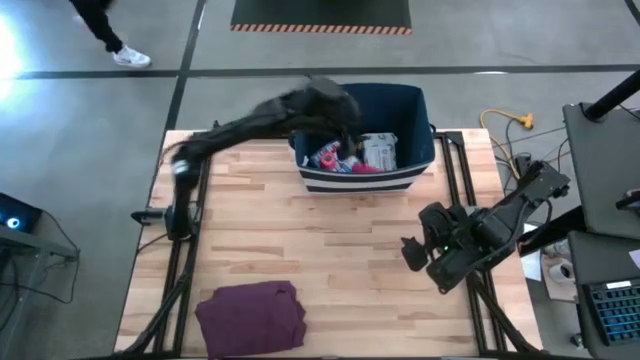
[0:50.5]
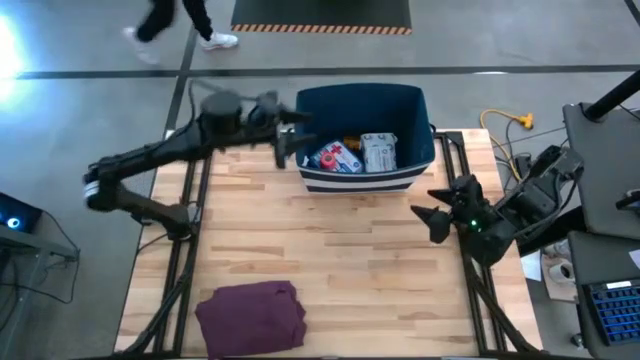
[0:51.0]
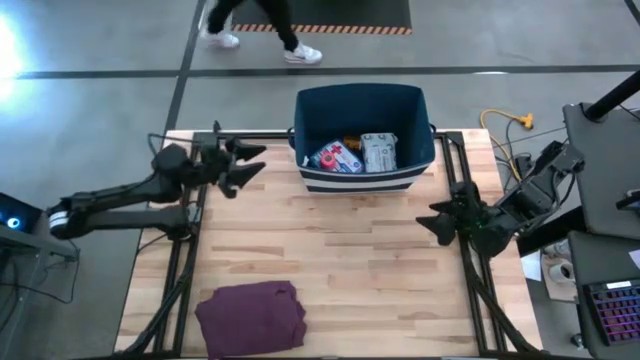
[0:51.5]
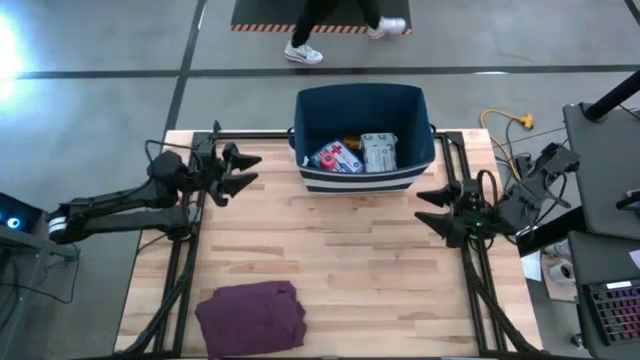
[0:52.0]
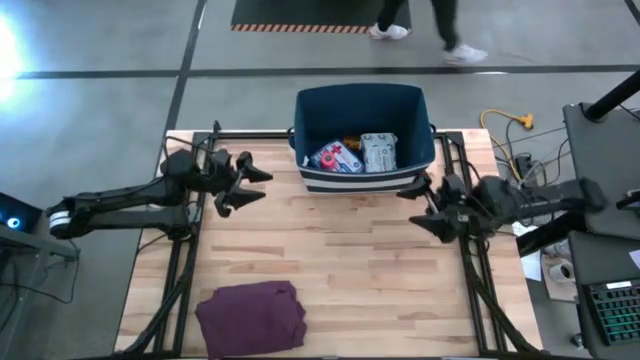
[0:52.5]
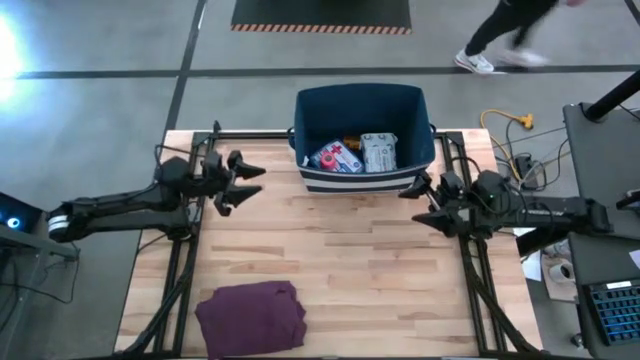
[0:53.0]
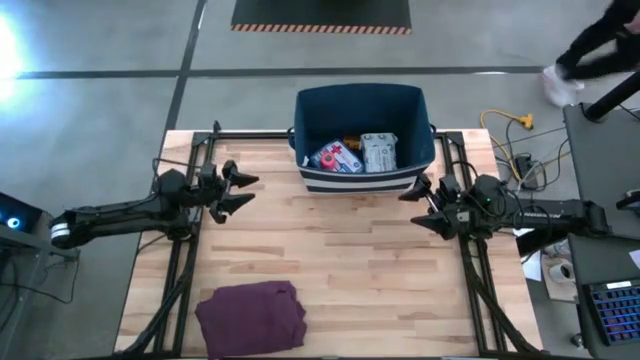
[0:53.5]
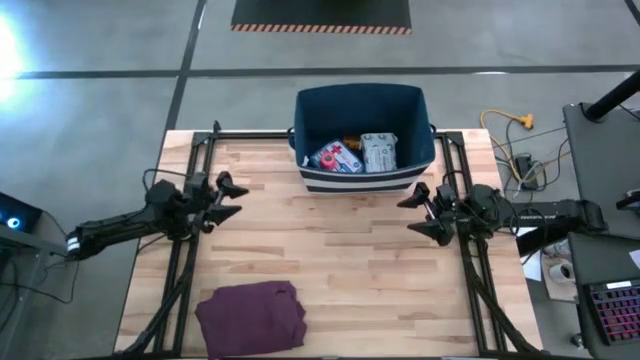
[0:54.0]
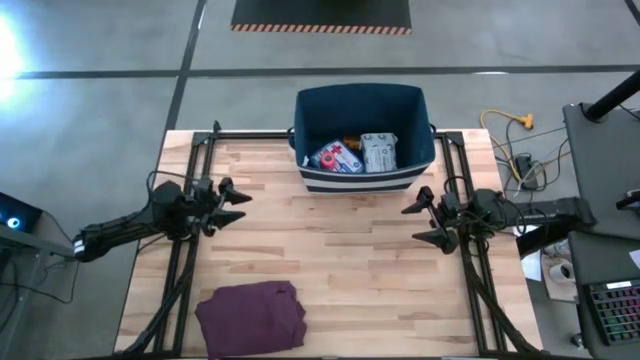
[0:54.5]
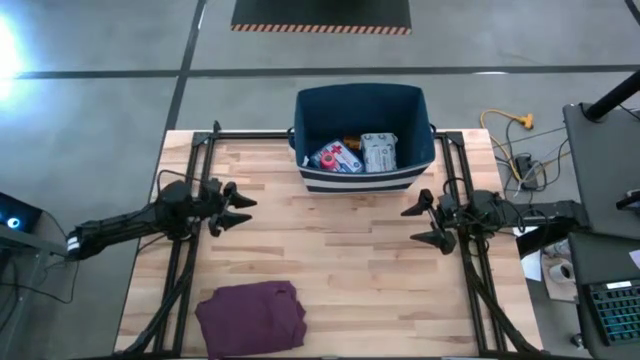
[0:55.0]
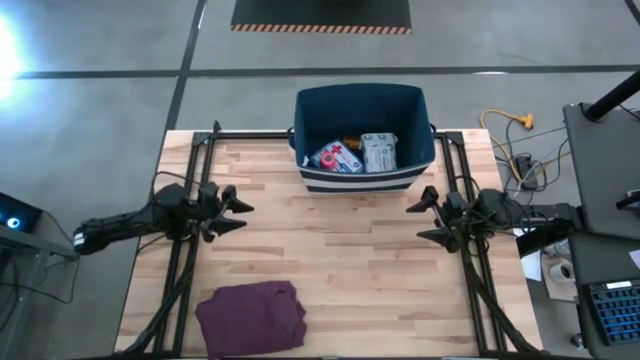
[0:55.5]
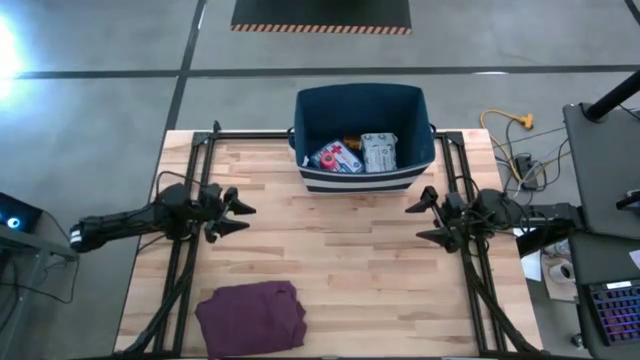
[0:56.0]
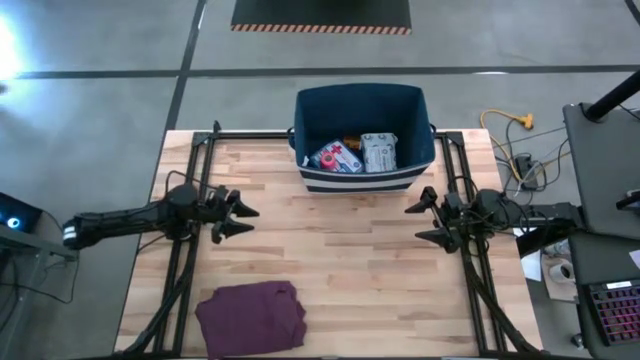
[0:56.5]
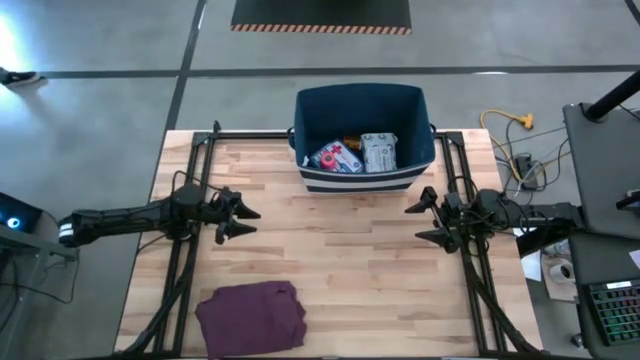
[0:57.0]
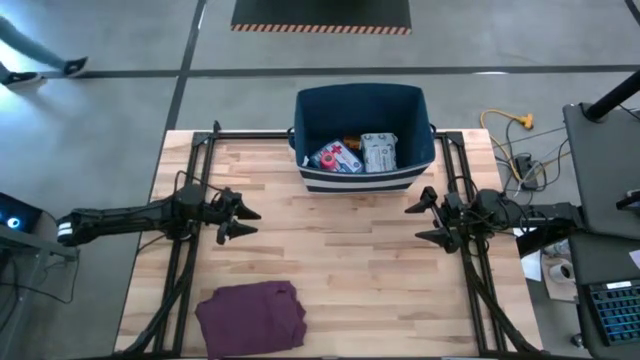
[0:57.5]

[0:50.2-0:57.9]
Task: Pick & place medical supplies in basket/bin
Return to Home Position

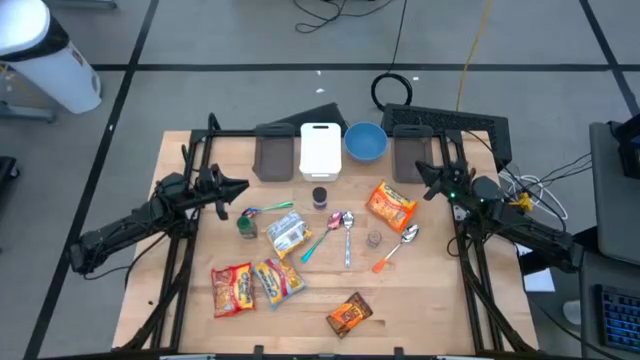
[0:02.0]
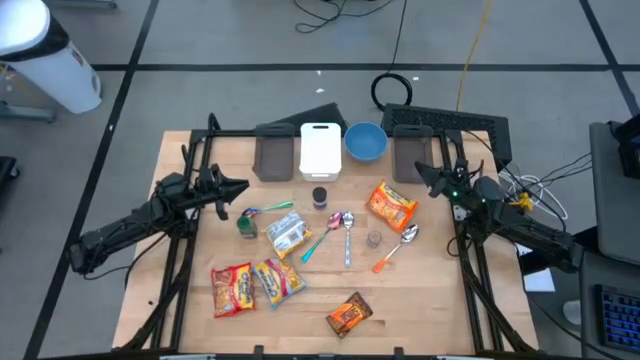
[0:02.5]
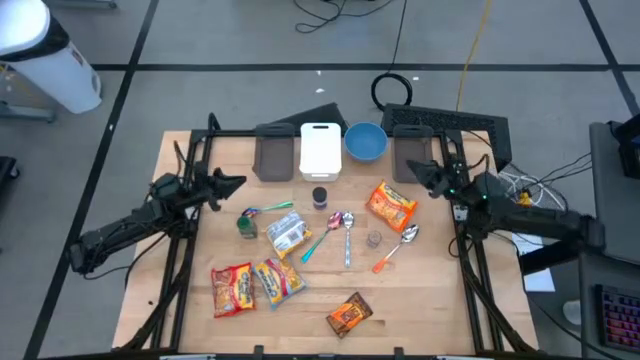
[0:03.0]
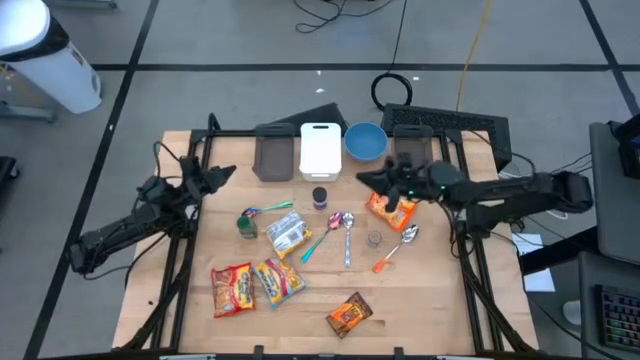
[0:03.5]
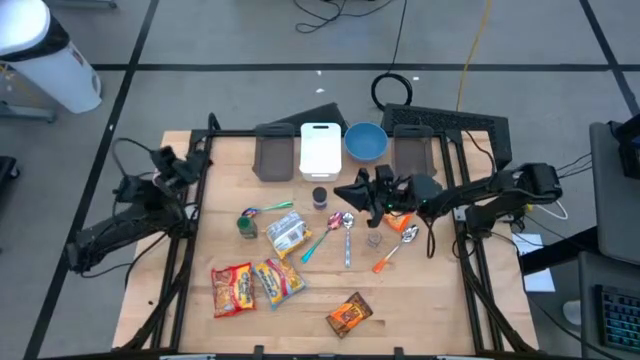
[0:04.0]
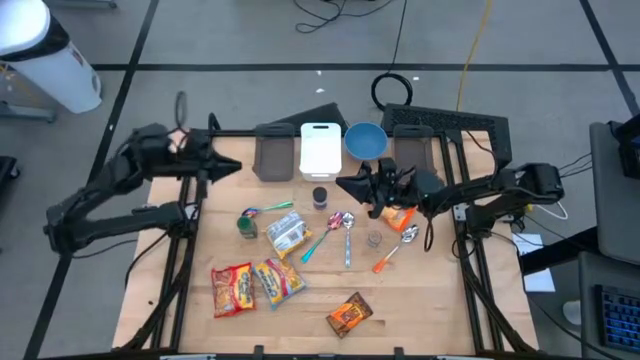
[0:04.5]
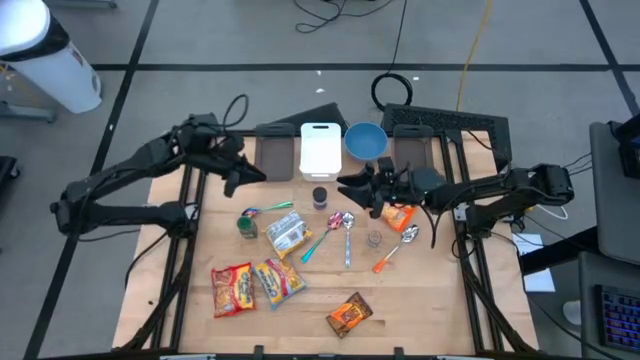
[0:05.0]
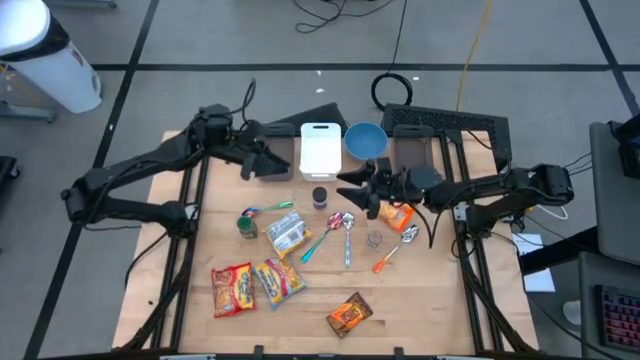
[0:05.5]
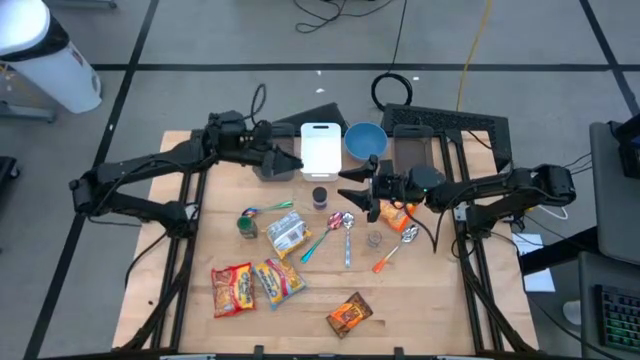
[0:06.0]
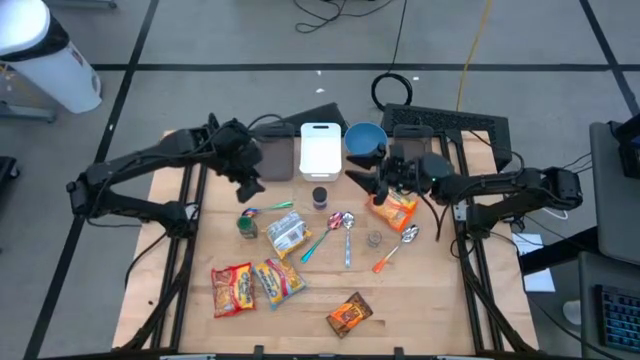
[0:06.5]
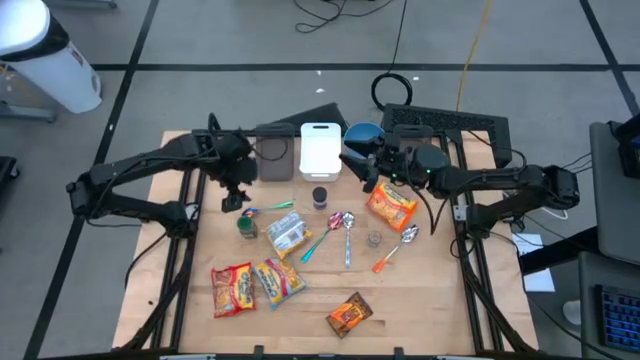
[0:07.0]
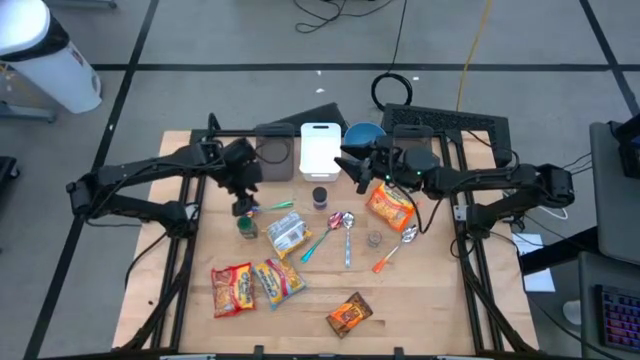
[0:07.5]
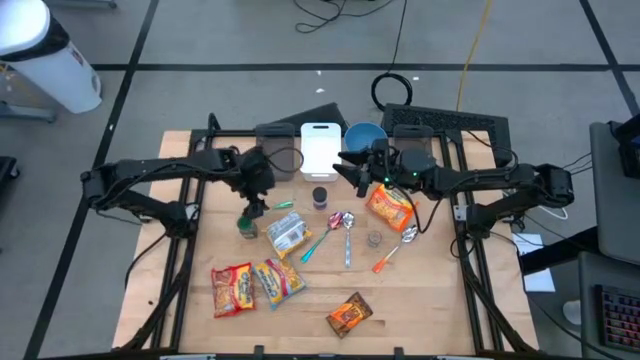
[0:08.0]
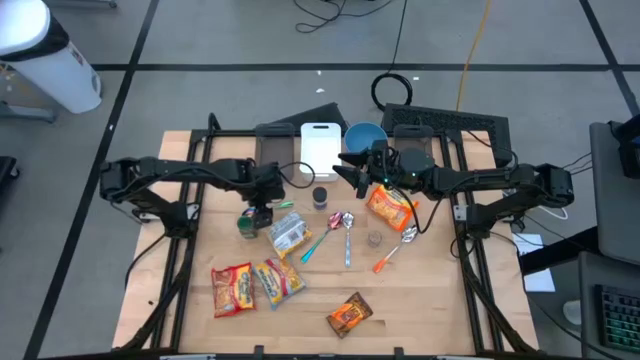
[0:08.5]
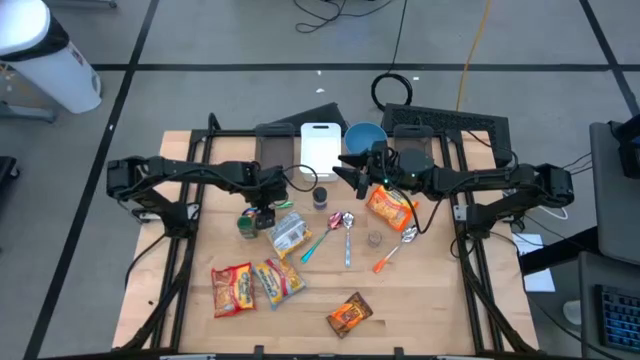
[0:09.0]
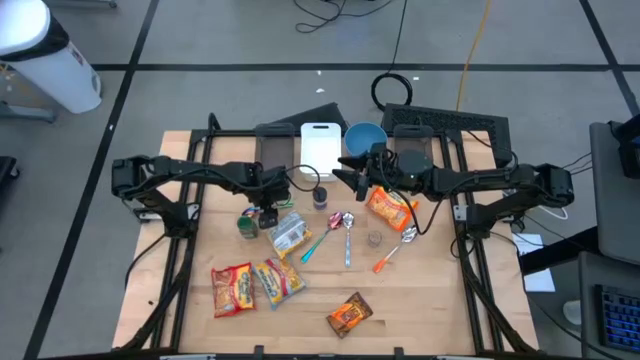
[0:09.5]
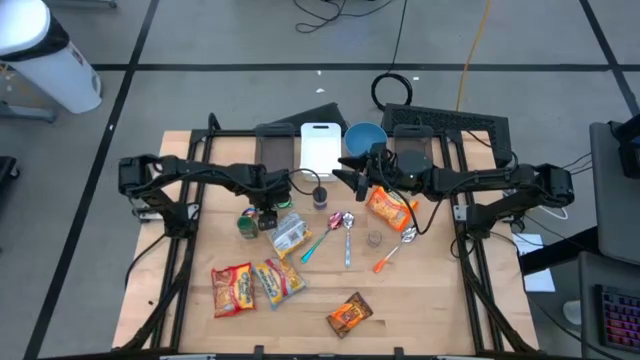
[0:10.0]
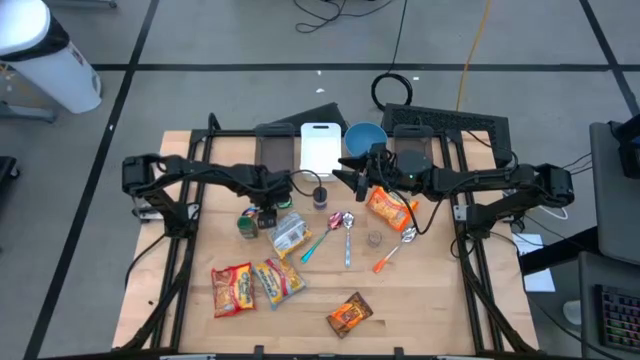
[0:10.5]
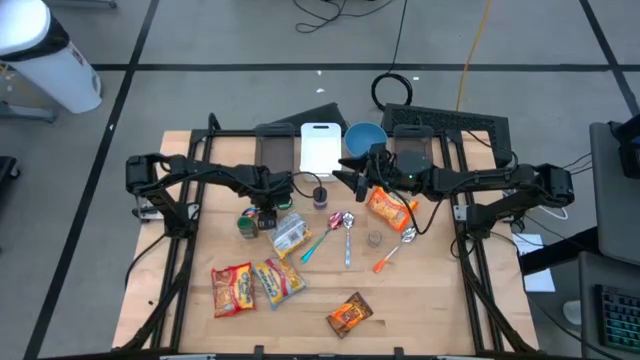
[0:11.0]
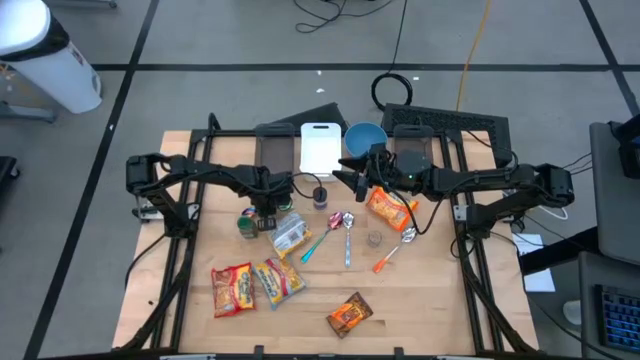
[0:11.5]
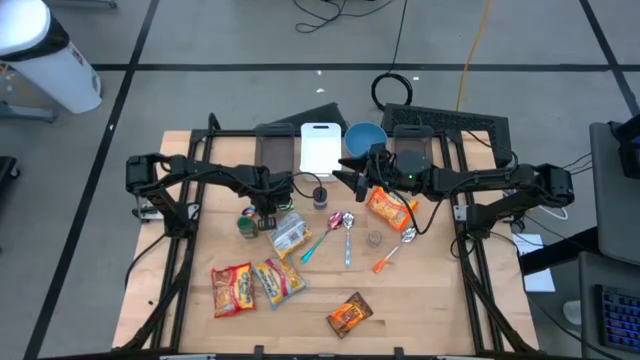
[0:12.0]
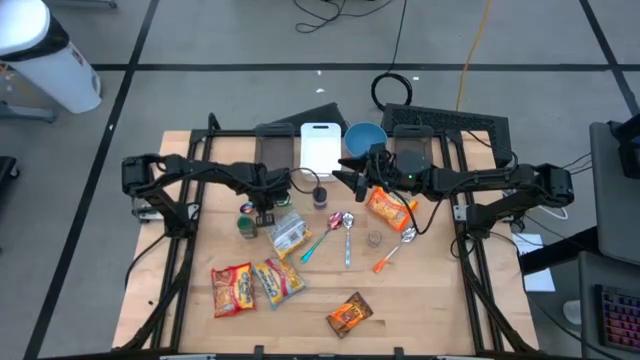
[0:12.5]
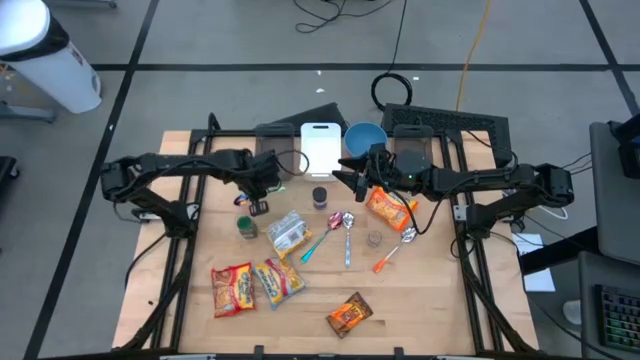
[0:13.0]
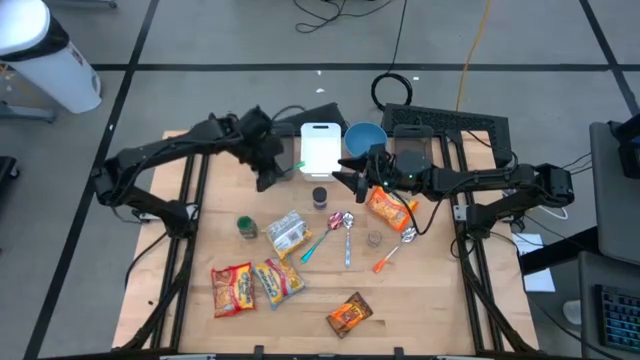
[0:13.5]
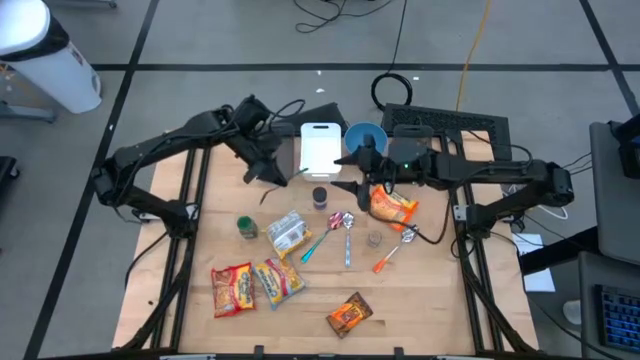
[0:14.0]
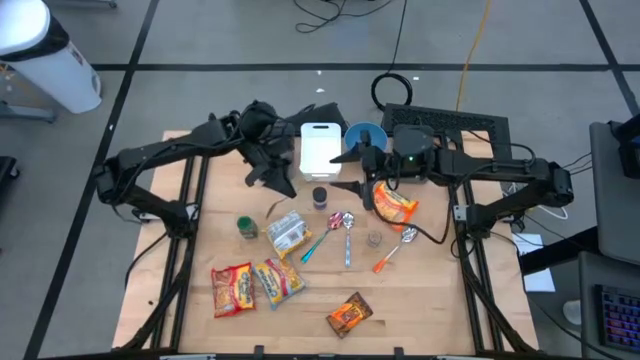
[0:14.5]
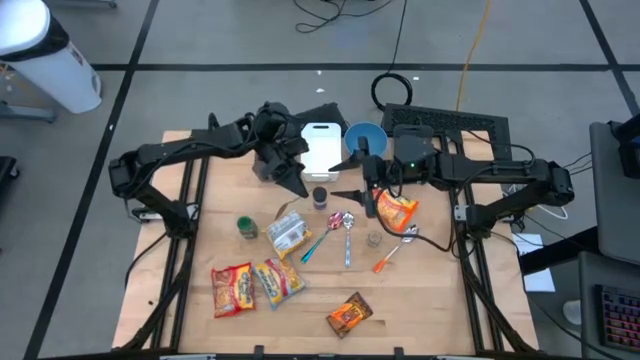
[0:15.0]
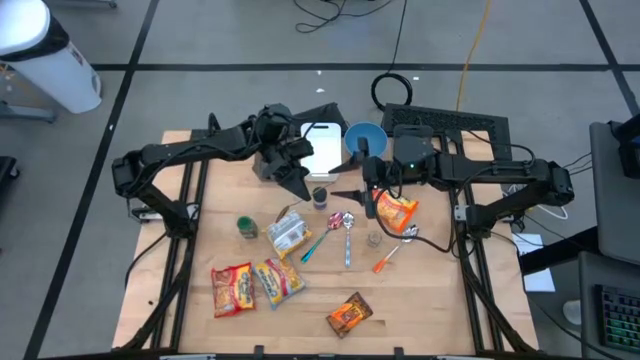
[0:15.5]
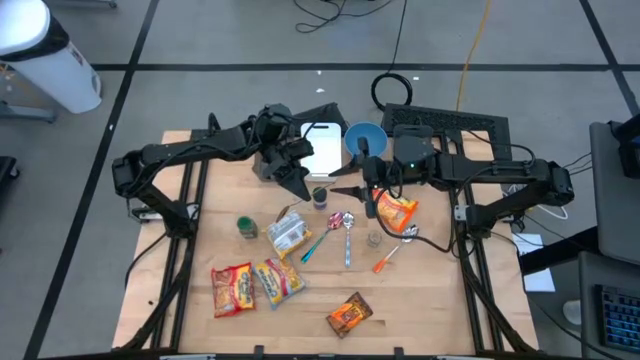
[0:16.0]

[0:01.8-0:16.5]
Task: Pick & Place Food Item
Put the left blue spoon into the left black bin
